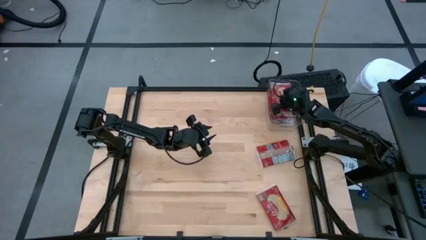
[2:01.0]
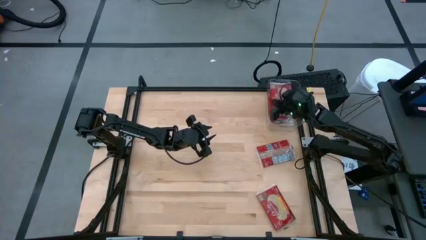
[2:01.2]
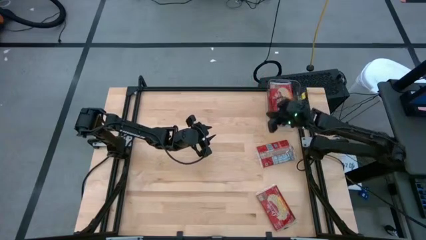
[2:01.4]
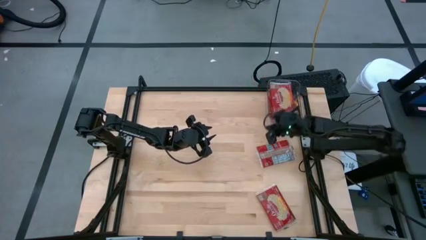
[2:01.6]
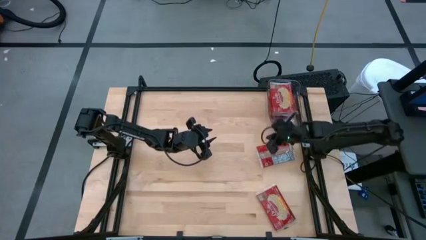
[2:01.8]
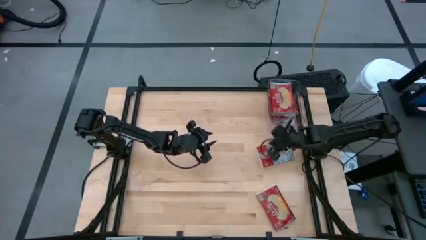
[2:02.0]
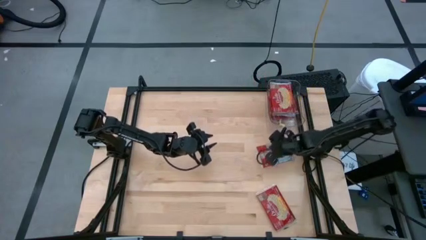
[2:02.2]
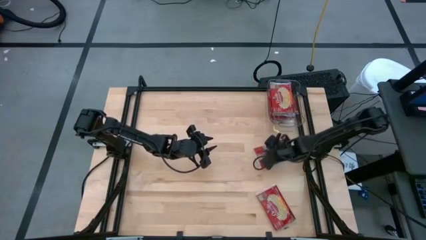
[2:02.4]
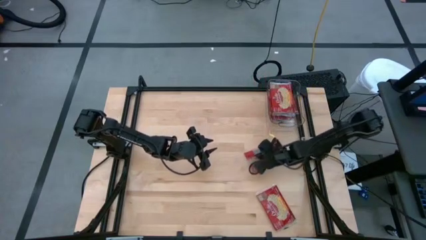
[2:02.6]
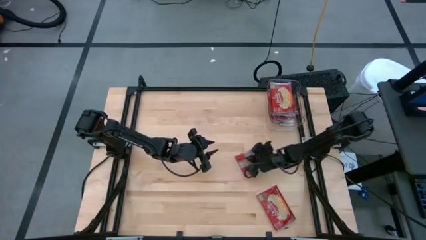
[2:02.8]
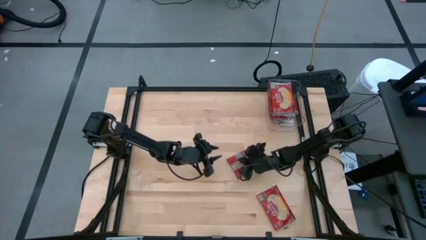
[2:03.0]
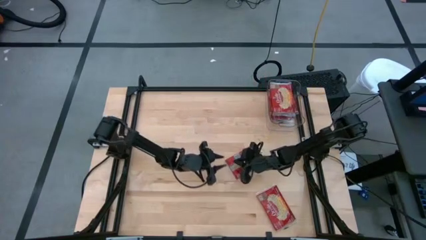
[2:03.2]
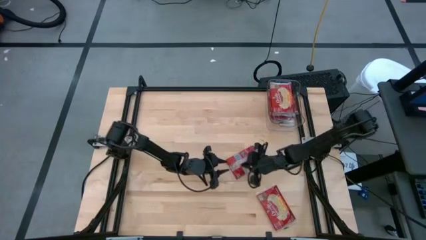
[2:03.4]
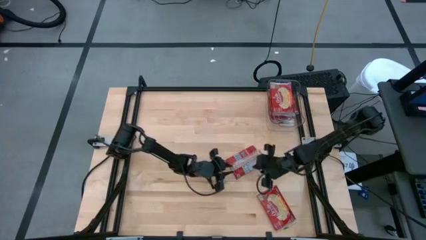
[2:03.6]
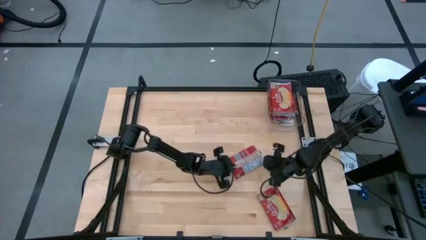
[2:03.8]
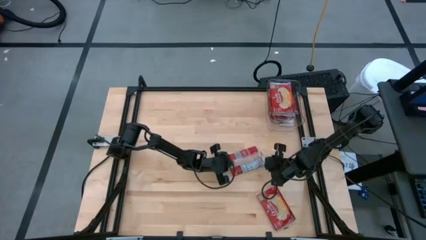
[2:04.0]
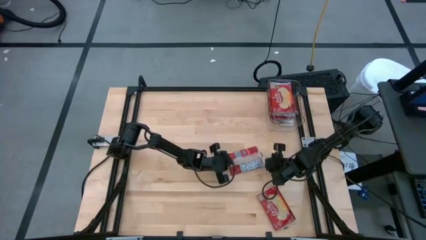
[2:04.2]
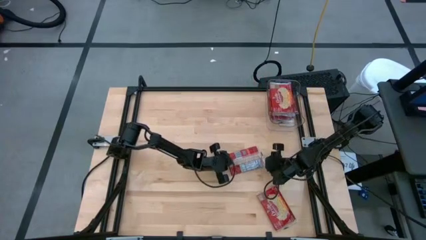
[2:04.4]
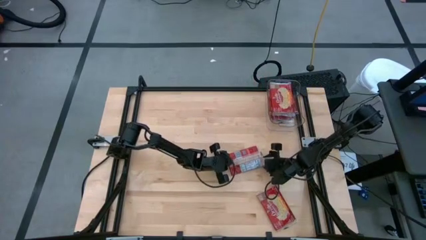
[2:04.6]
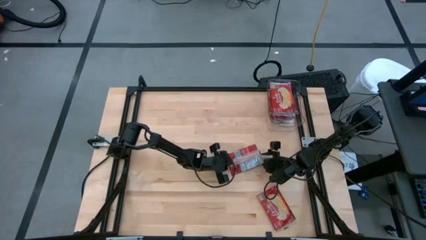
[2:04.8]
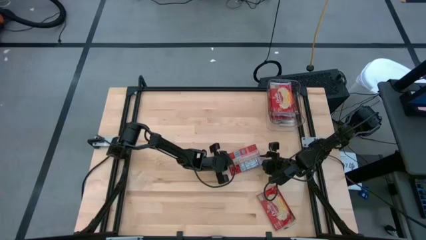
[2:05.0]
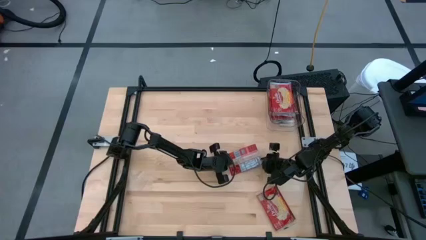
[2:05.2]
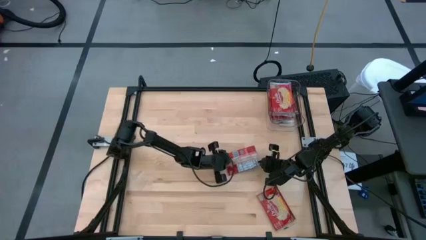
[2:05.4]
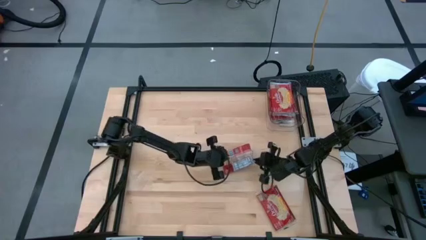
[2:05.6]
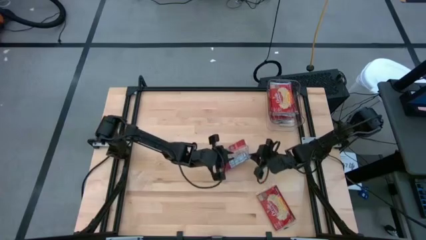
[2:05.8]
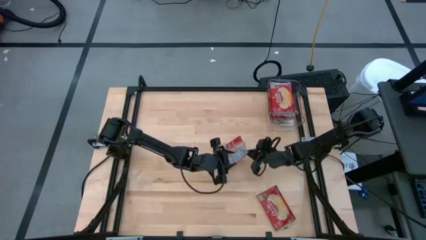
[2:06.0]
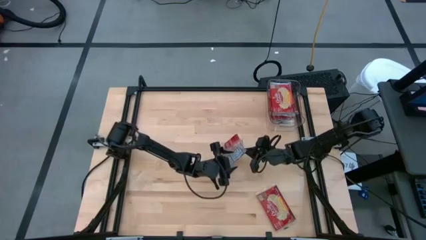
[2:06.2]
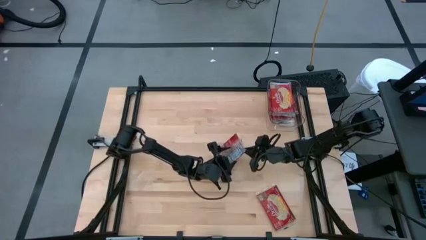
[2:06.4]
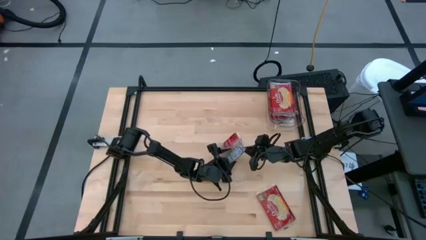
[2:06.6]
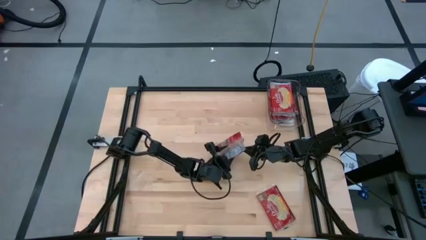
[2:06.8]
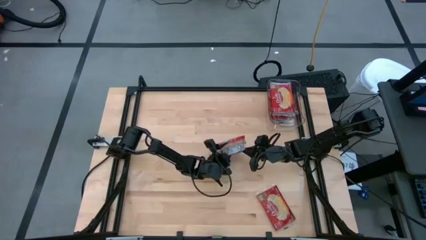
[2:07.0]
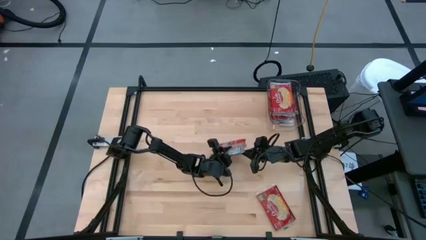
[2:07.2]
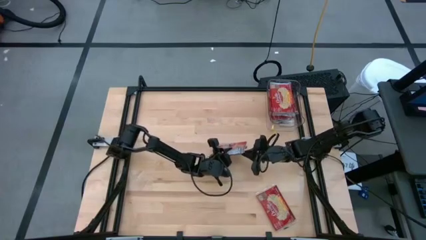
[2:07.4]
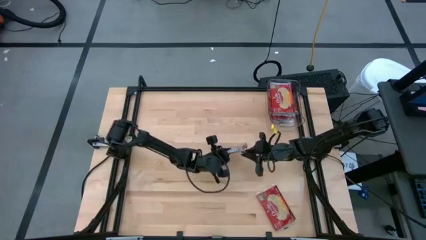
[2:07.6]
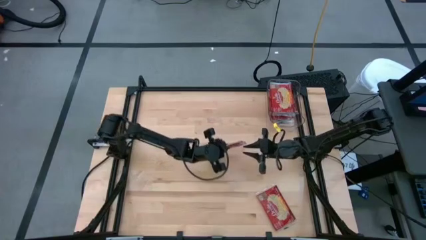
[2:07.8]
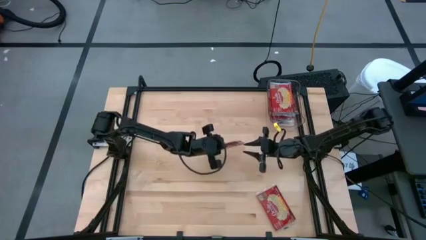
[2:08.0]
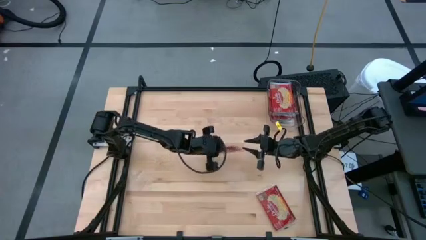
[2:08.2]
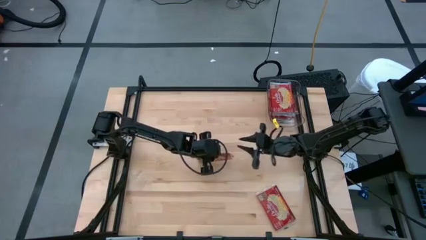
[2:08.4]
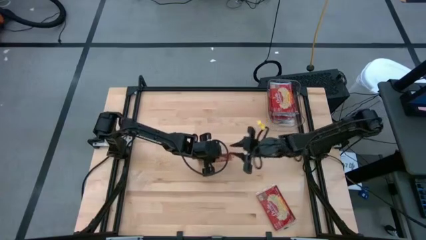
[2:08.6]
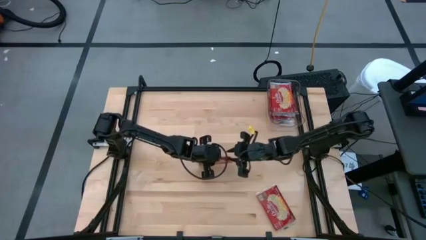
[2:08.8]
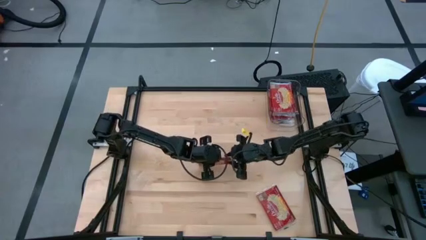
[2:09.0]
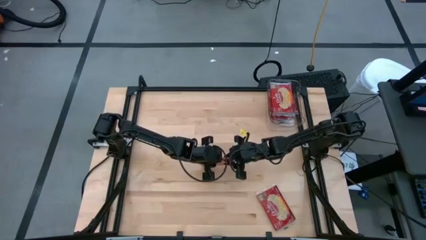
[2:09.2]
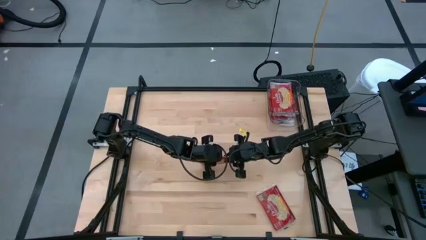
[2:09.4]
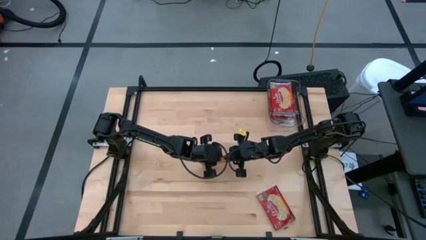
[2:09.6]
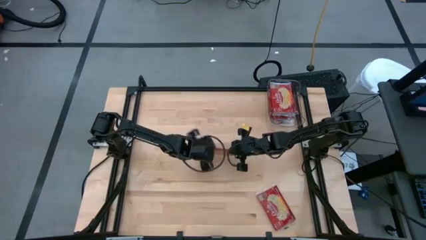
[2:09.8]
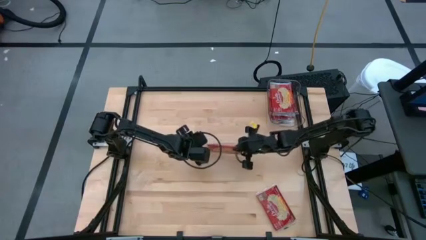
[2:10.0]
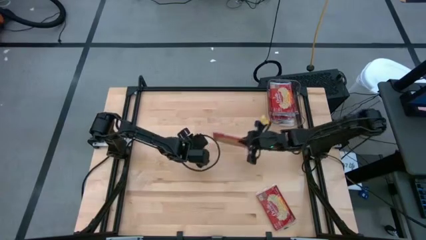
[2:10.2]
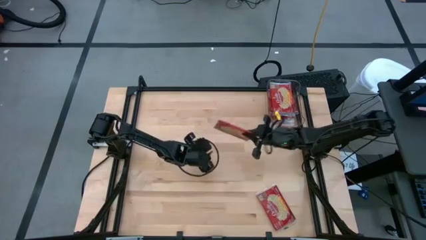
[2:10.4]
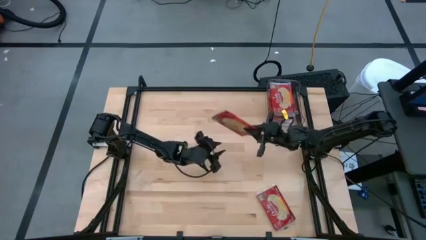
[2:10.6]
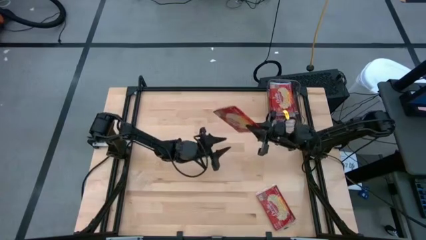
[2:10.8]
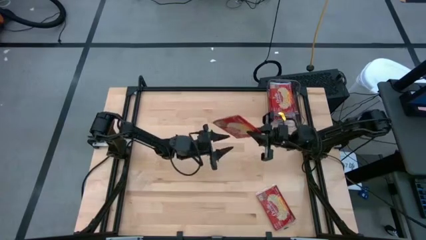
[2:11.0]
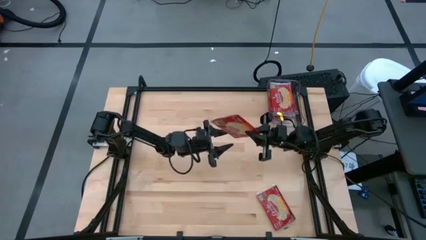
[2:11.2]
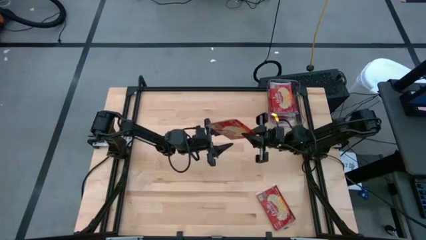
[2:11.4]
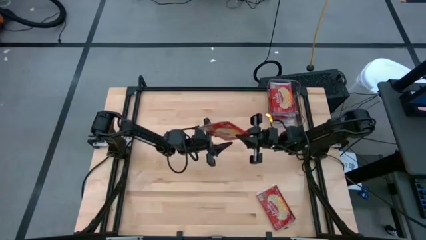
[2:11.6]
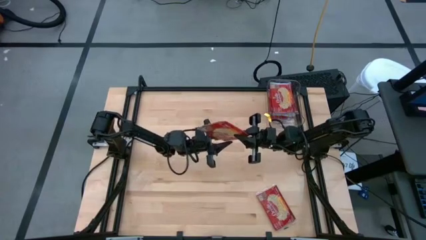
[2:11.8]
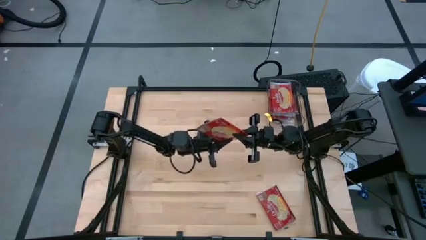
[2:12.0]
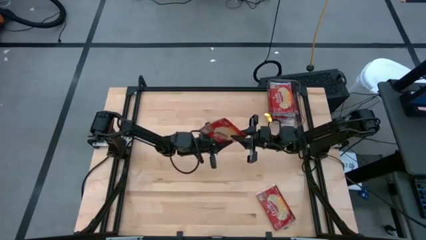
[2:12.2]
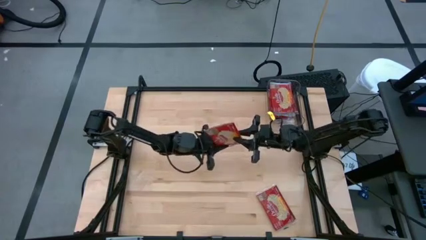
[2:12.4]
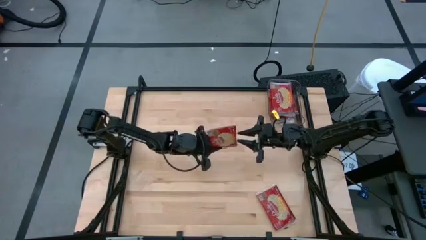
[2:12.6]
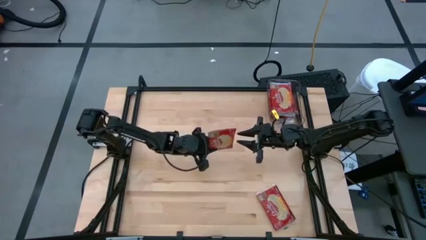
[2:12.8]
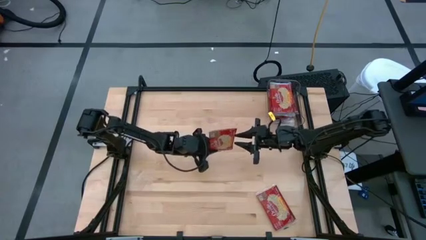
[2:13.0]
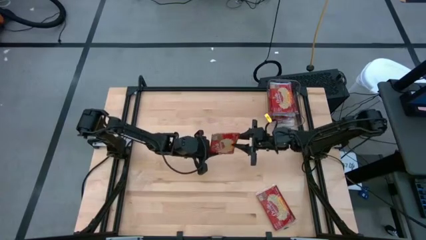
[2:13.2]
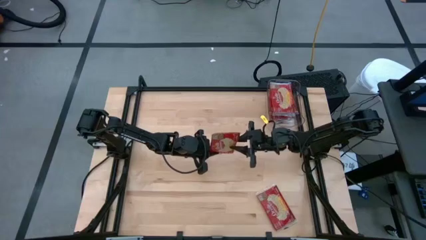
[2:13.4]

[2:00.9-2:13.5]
Task: Sort popcorn bags into baskets
Put the red popcorn bag into the transparent bin

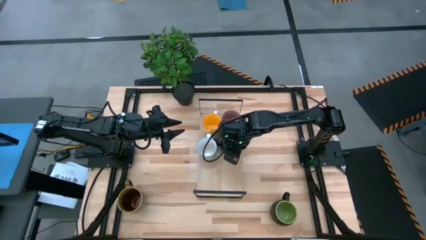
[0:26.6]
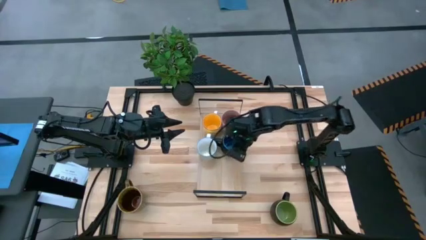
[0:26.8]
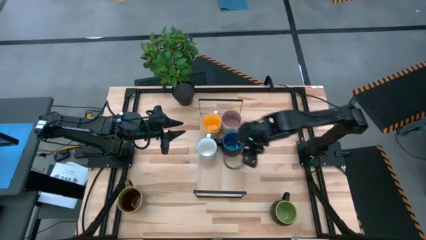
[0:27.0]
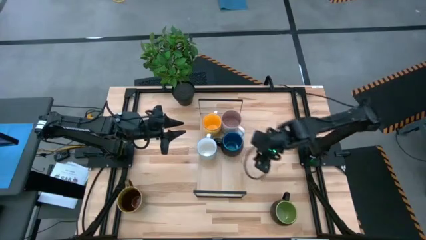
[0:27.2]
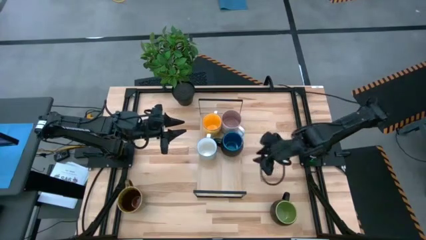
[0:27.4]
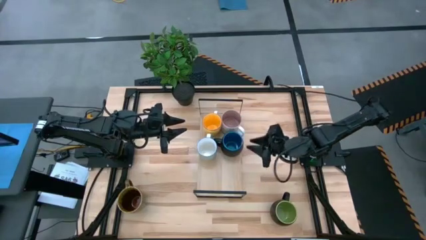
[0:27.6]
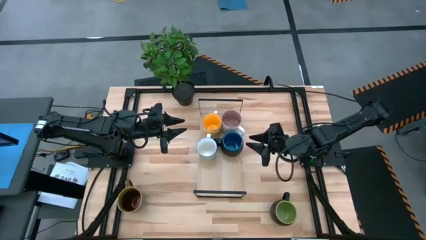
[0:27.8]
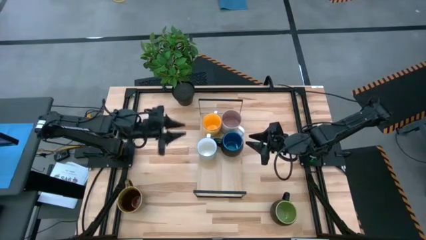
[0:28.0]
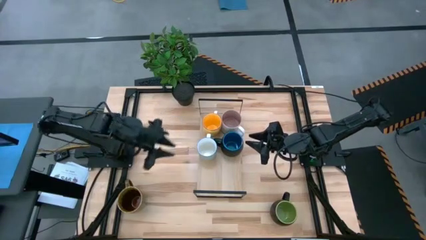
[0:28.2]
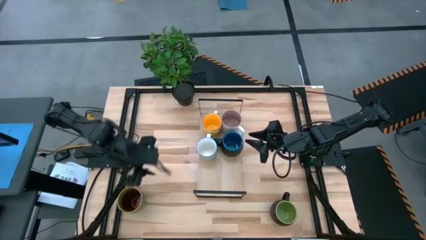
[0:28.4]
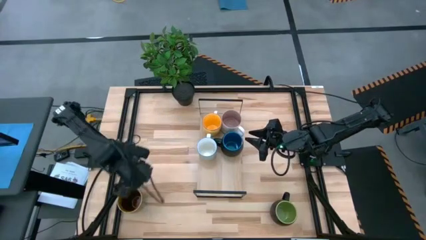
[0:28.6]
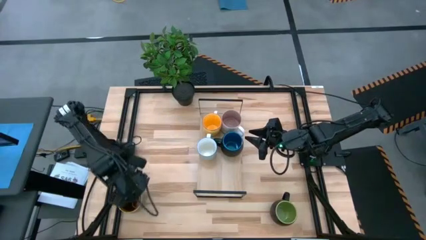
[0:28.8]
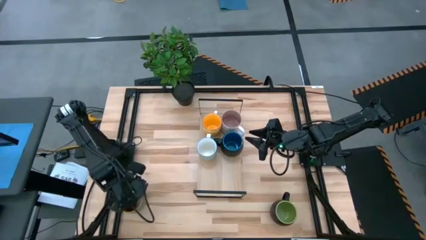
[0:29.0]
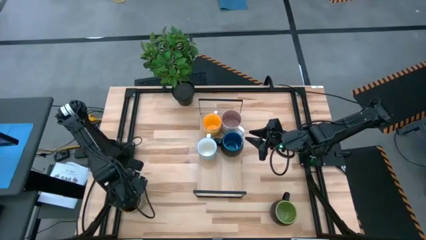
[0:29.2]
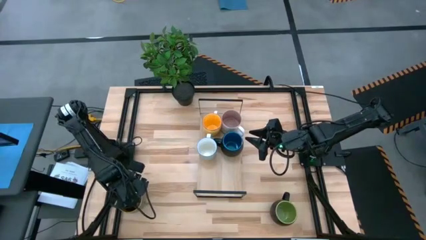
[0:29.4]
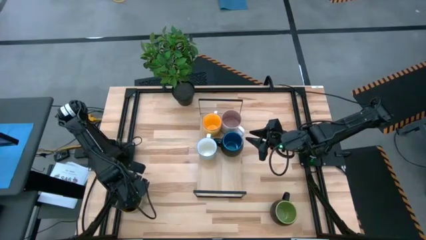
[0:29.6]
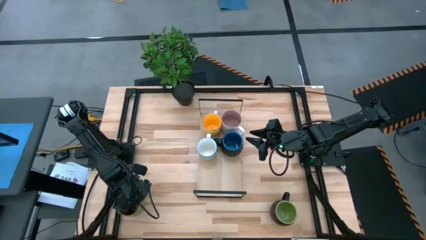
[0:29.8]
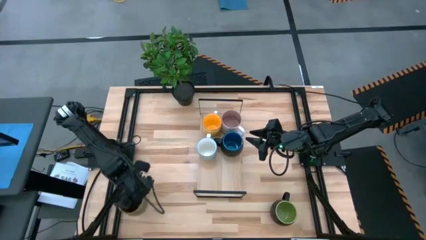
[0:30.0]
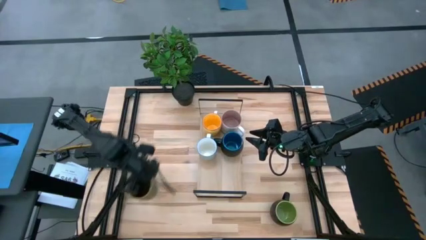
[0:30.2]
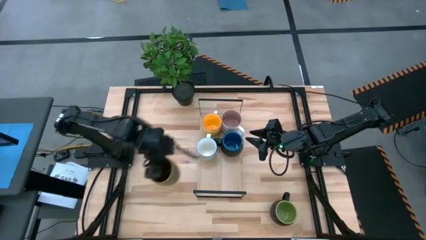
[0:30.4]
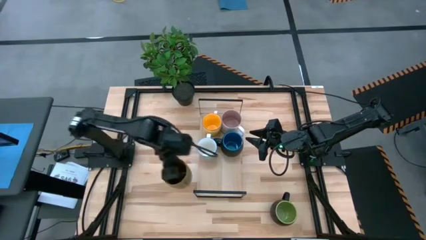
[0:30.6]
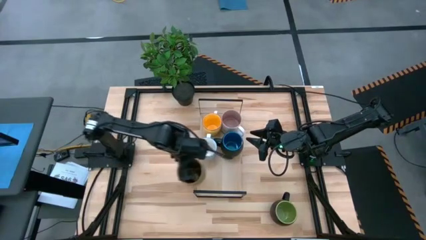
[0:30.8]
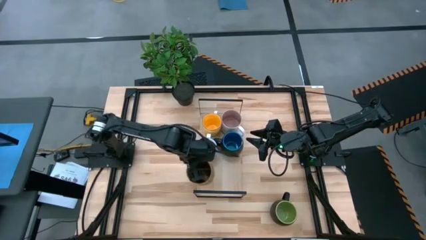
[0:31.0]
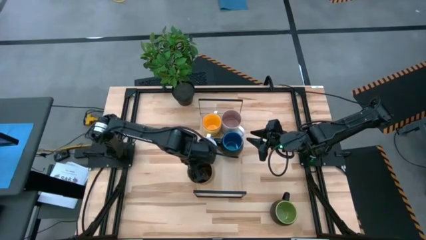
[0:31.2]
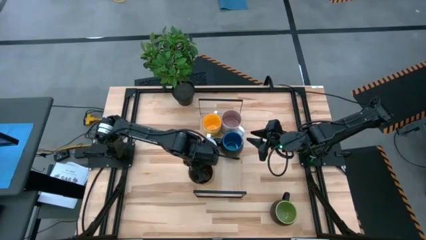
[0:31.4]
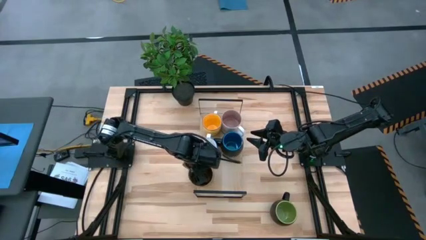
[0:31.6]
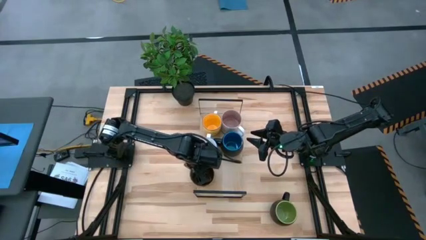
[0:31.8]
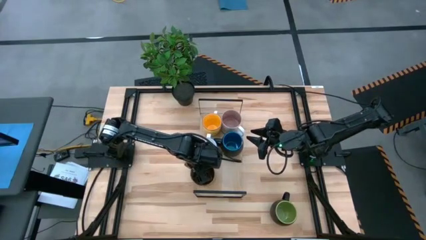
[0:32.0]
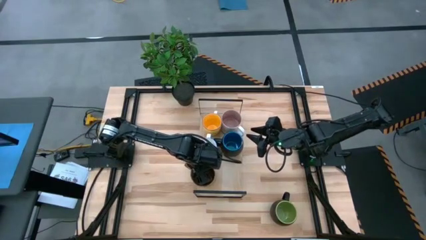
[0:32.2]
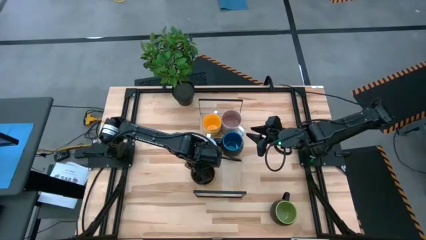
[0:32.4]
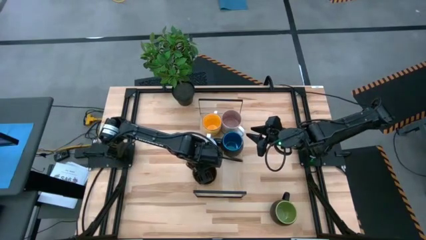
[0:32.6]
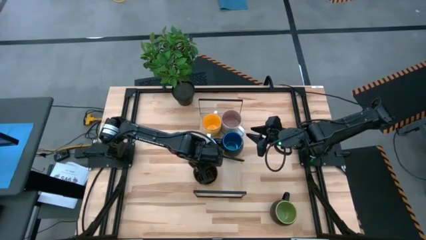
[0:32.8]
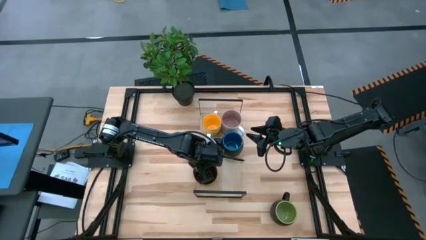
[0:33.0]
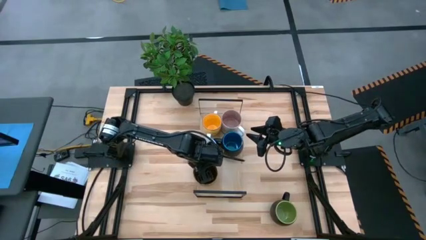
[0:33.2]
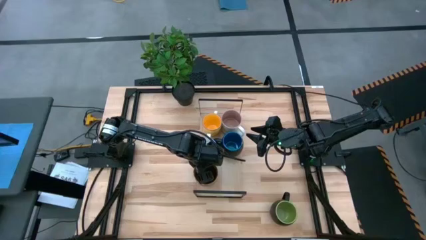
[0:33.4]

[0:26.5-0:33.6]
Task: Place coffee mugs
Put the brown green mug on the shelf
